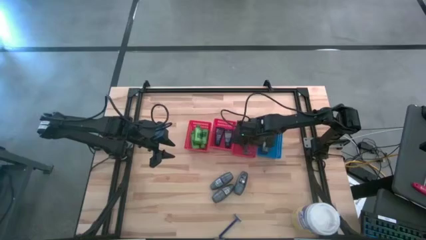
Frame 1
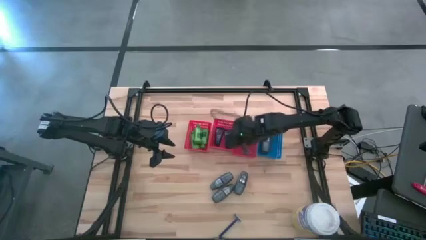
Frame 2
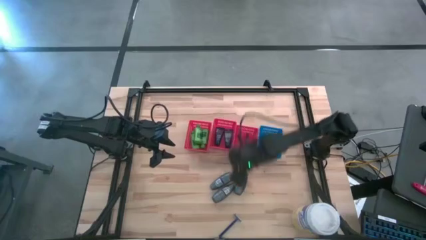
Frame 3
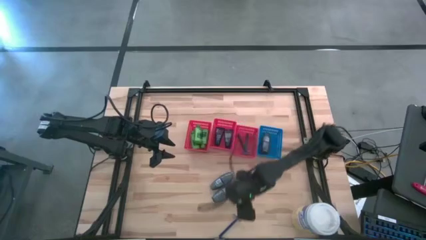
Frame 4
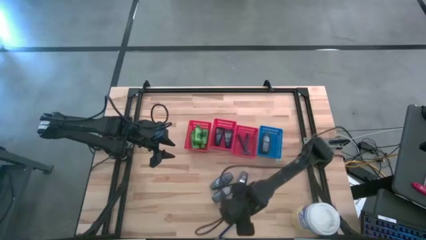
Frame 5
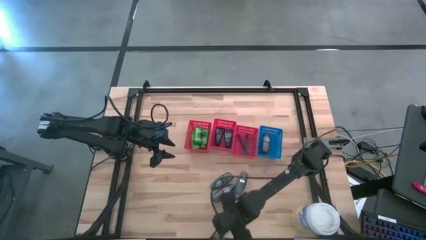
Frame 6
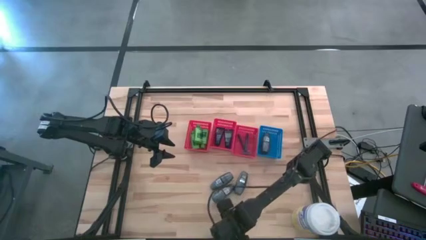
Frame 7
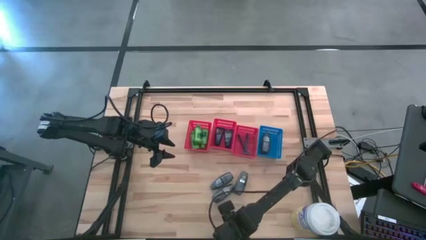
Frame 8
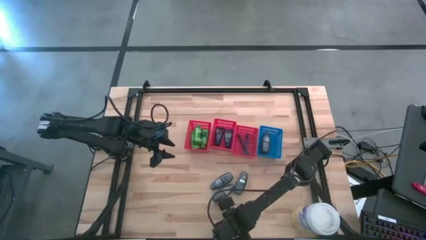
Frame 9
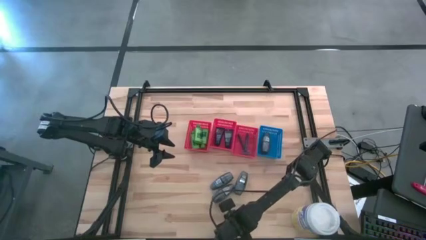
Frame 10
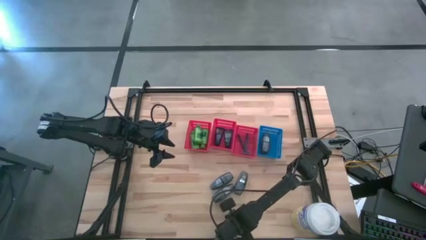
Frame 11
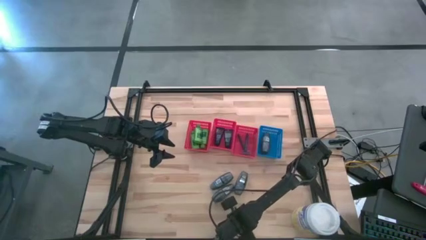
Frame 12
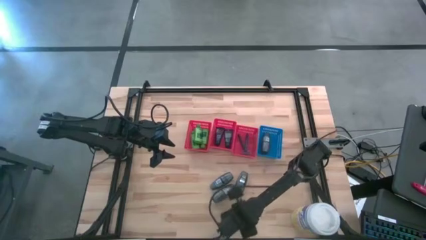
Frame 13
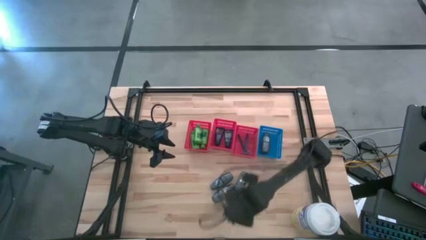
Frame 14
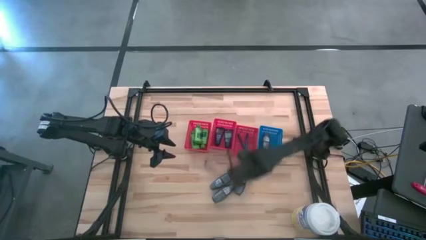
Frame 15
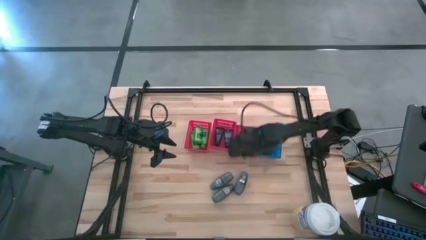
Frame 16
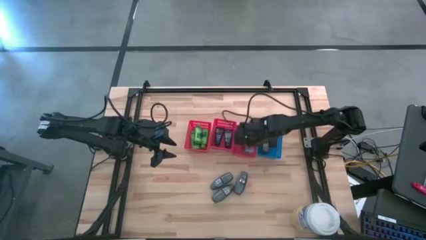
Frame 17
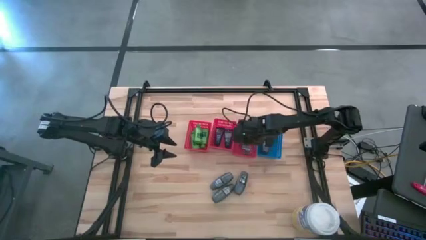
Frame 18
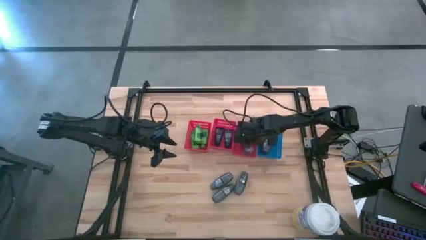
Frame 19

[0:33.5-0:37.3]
Task: Pick & Place Travel size toiletries
Put the blue razor in the right red bin

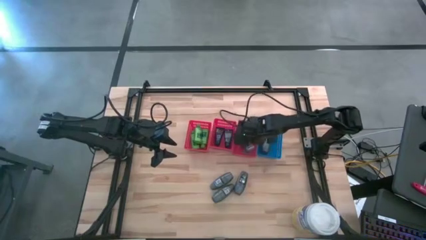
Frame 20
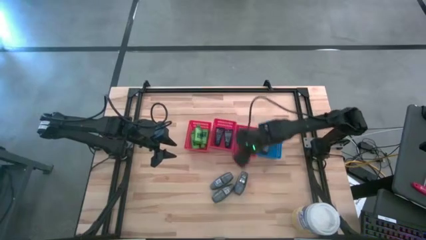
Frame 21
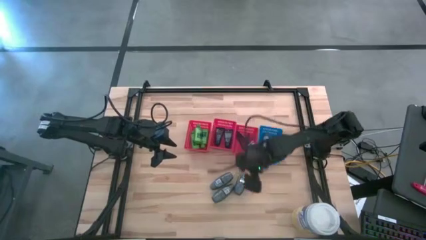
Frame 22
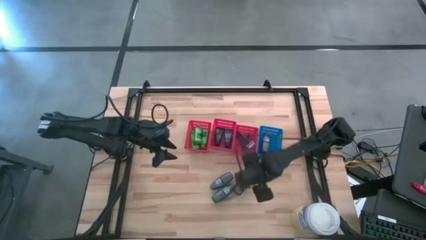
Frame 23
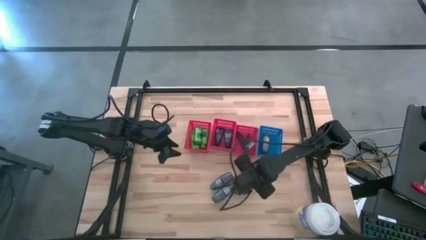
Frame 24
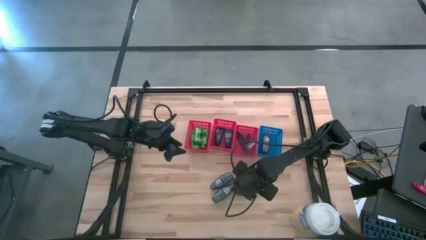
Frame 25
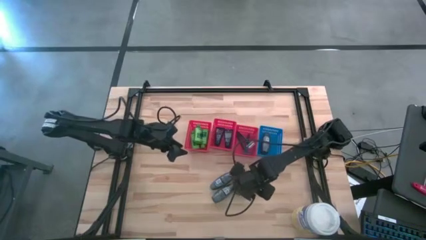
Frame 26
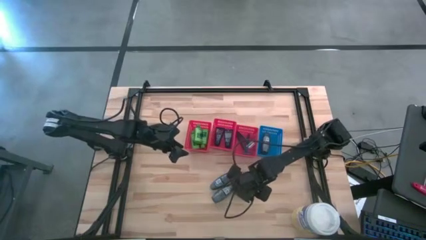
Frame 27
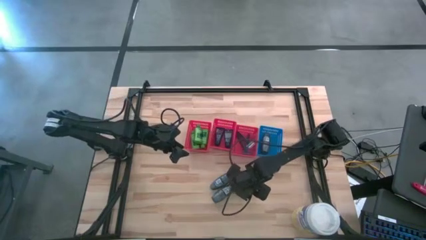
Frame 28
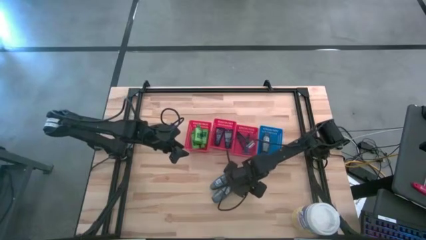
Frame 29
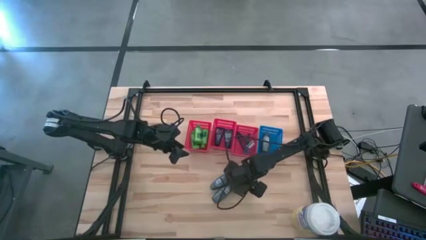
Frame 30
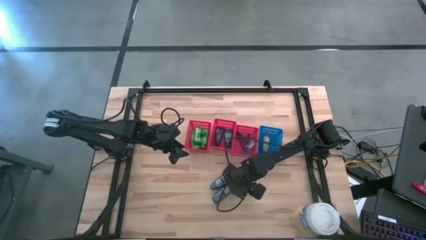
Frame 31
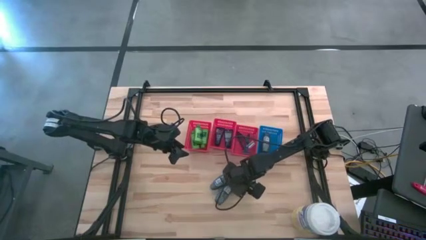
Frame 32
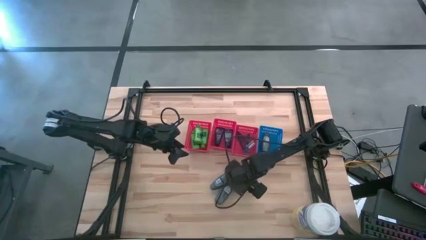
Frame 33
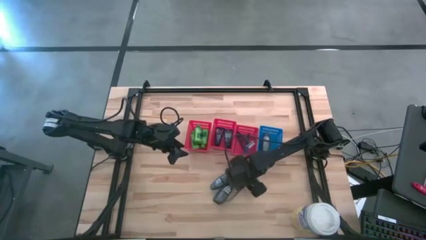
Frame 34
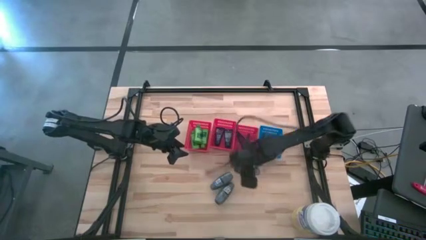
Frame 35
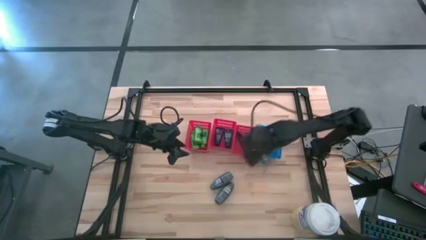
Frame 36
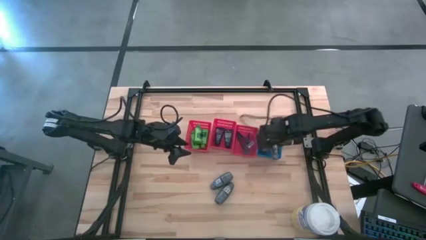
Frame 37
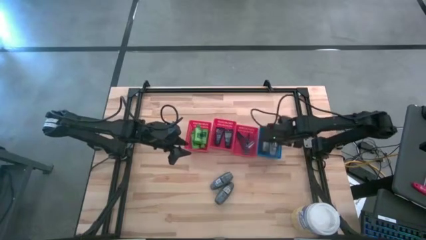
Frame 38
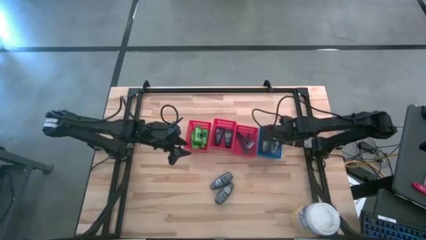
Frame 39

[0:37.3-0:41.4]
Put the gray deodorant in the blue bin

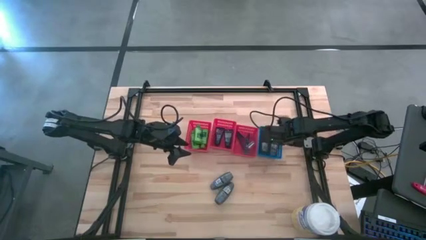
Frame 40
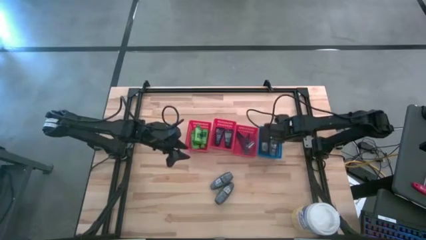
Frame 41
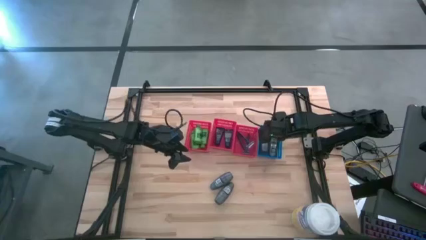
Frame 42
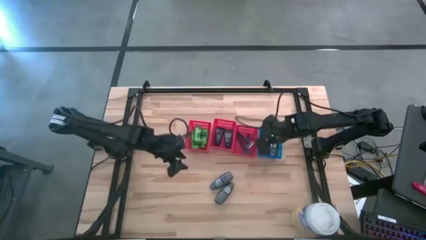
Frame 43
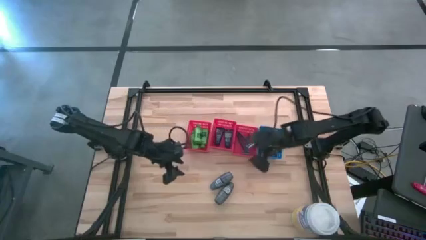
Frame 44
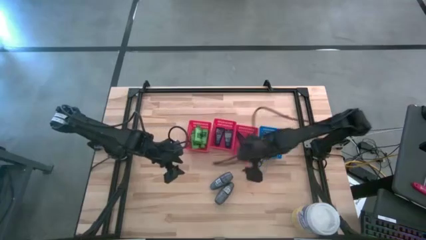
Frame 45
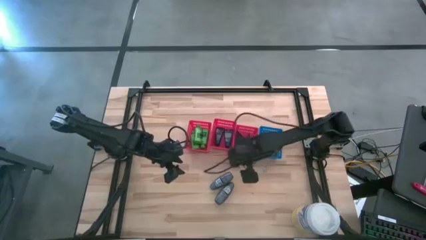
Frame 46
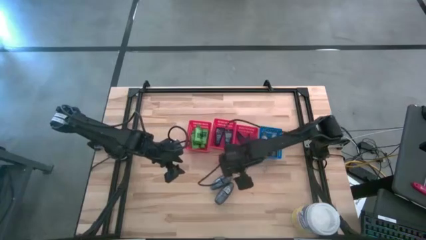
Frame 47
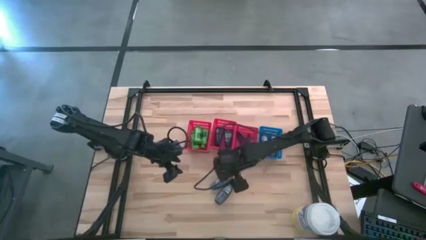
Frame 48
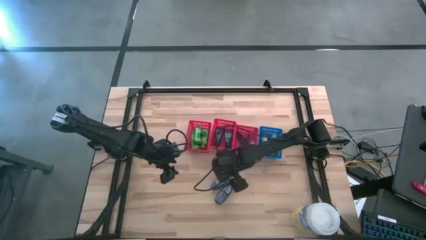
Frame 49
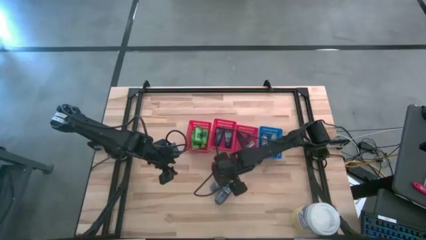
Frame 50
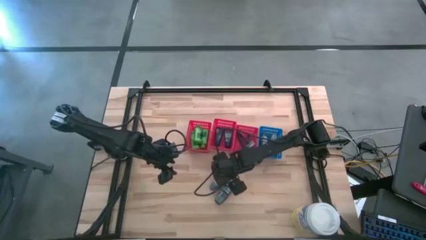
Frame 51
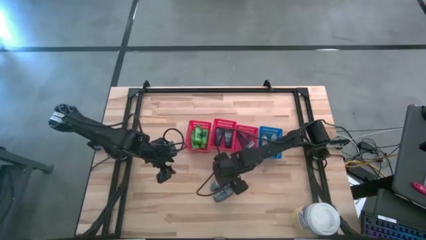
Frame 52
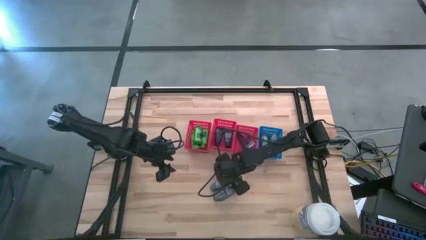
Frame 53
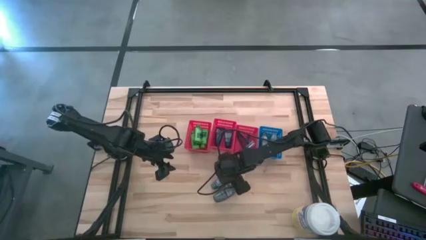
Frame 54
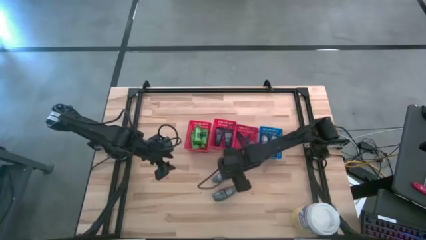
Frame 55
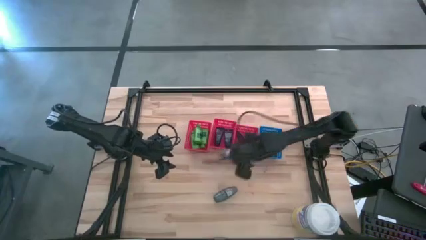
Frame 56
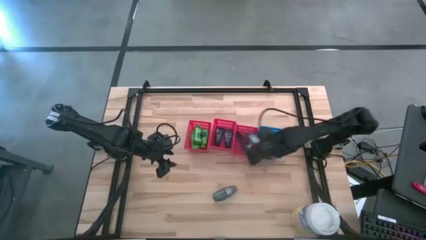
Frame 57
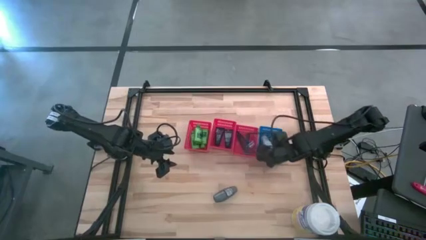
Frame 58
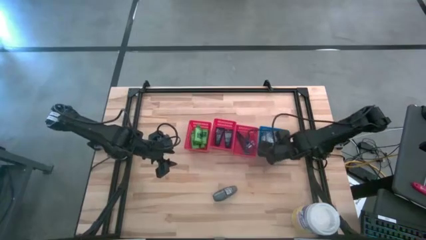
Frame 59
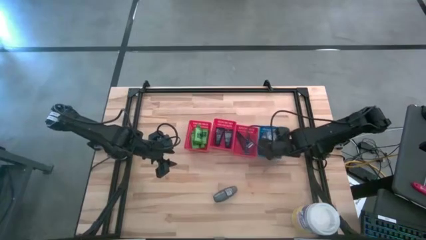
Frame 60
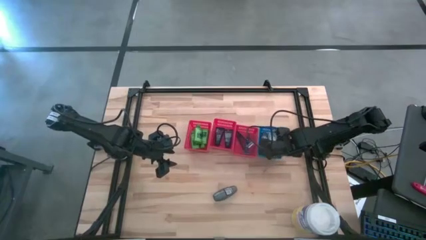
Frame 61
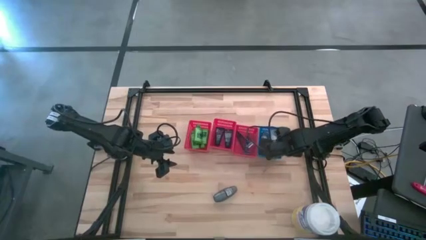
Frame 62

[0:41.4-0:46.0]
Put the gray deodorant in the blue bin

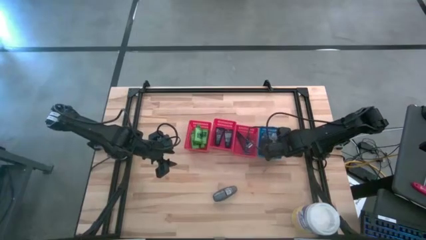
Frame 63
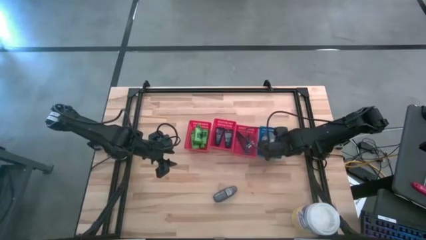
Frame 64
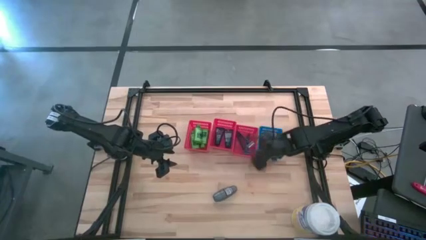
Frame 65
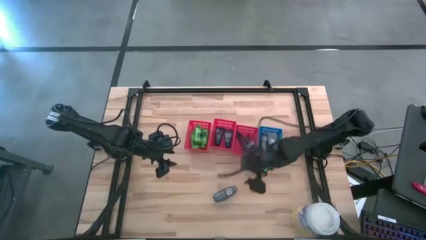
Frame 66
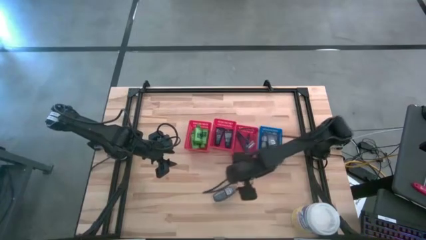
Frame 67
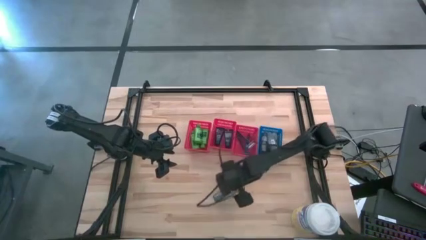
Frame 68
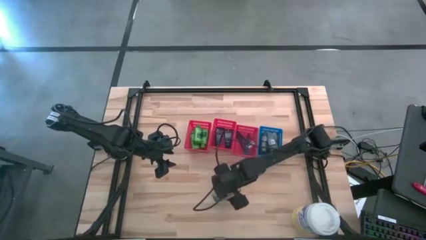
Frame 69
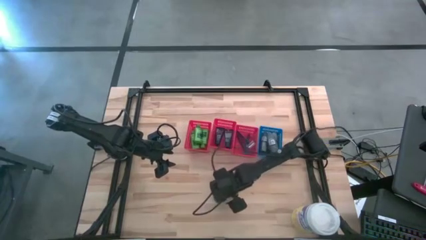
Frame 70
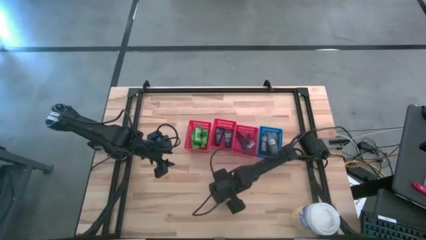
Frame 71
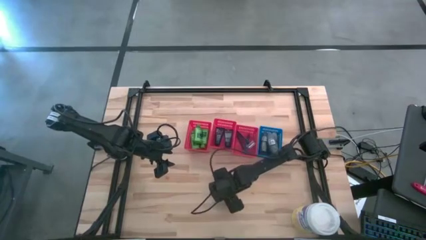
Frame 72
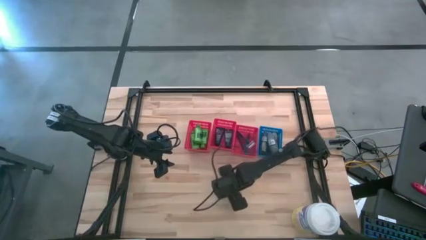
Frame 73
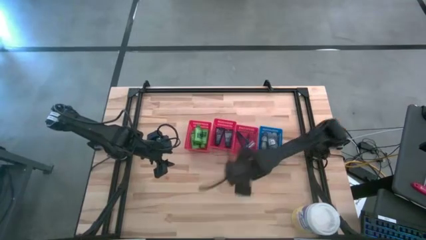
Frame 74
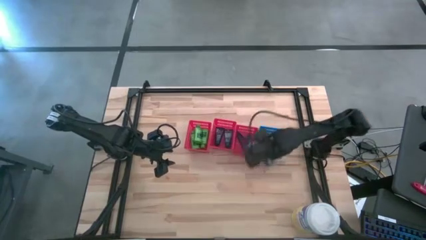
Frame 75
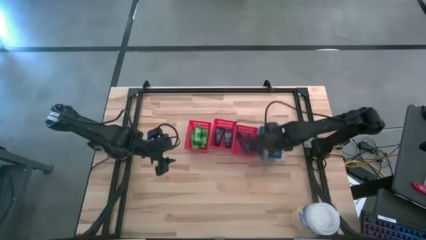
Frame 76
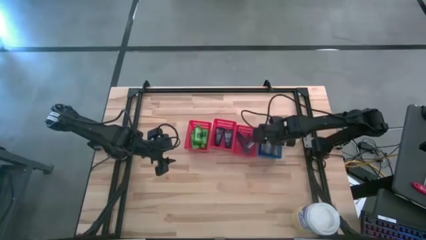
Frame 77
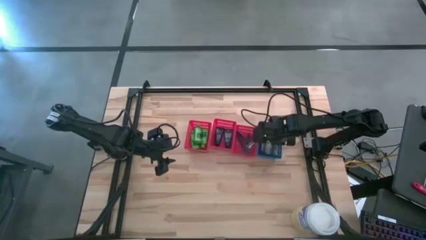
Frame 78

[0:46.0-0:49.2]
Put the gray deodorant in the blue bin

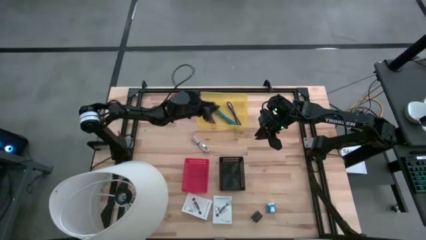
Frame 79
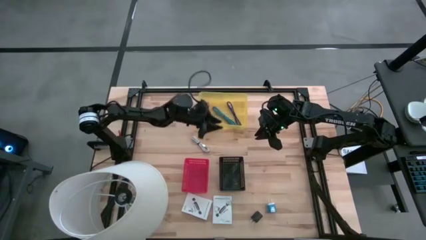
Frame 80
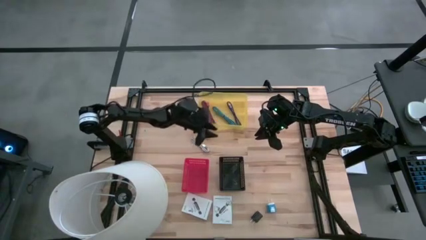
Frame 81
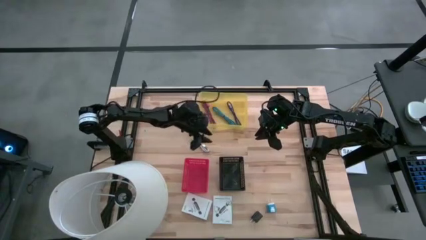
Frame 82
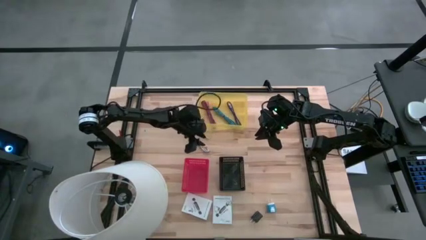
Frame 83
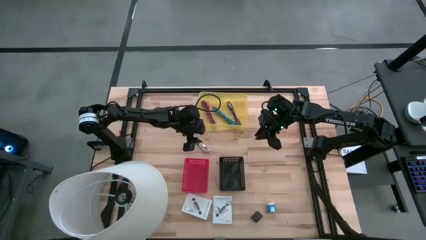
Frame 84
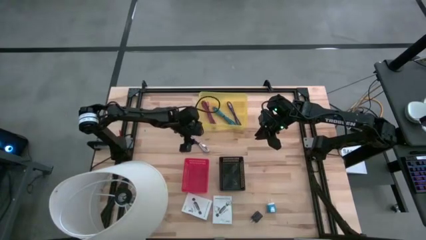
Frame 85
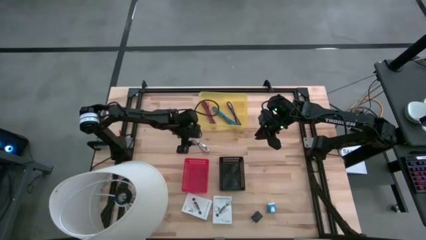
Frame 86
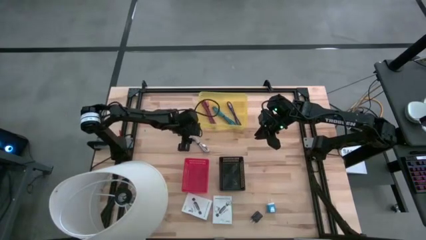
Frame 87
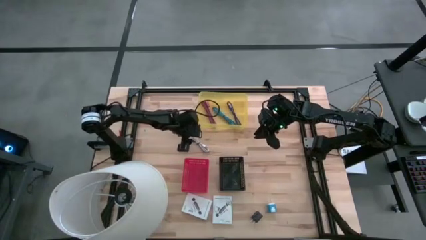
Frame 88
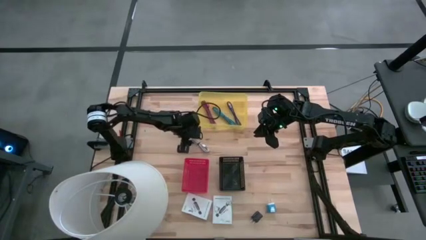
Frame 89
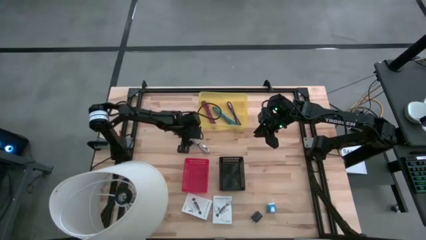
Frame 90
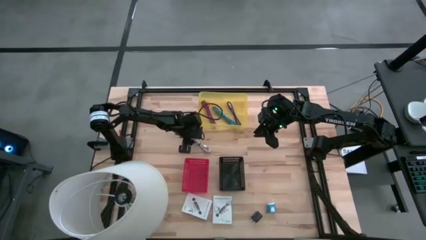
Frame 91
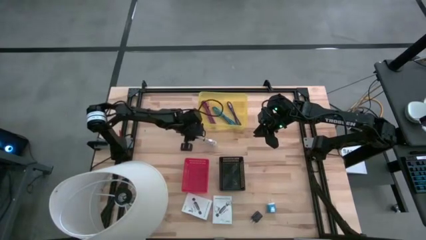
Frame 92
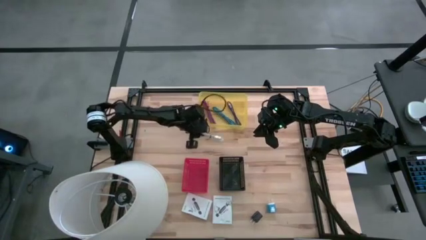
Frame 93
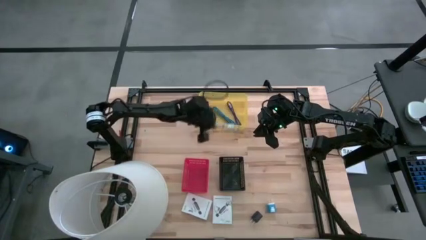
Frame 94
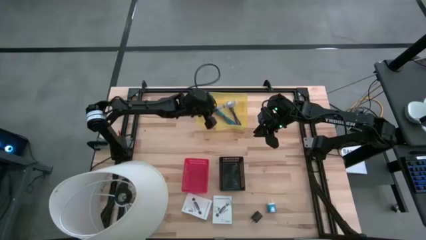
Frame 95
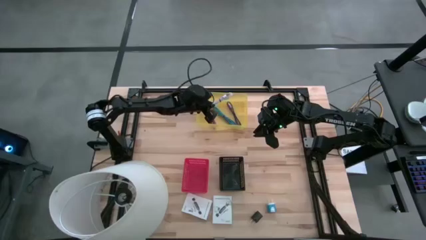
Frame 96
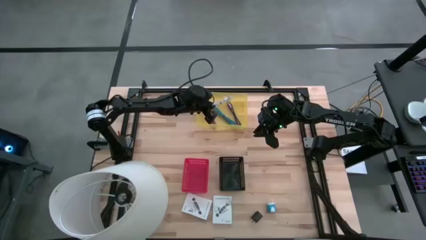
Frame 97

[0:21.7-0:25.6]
Task: Pick and place items into bin
Put the white usb cable into the yellow bin
